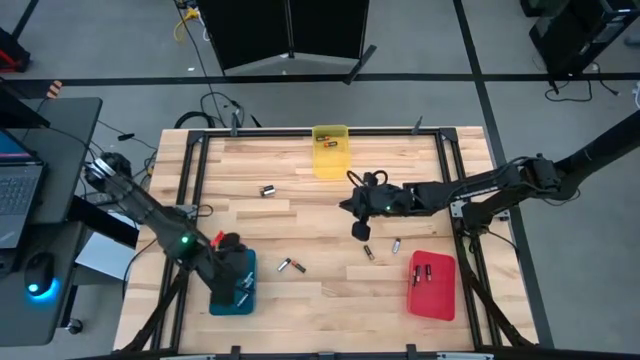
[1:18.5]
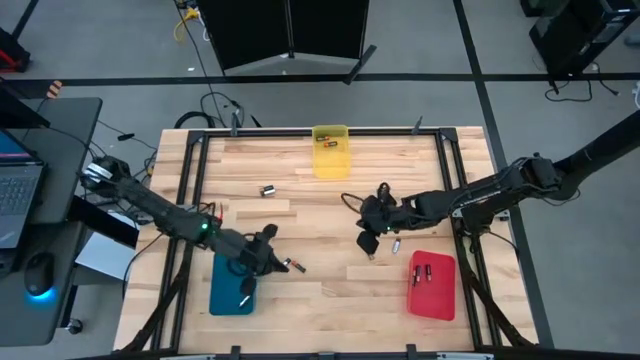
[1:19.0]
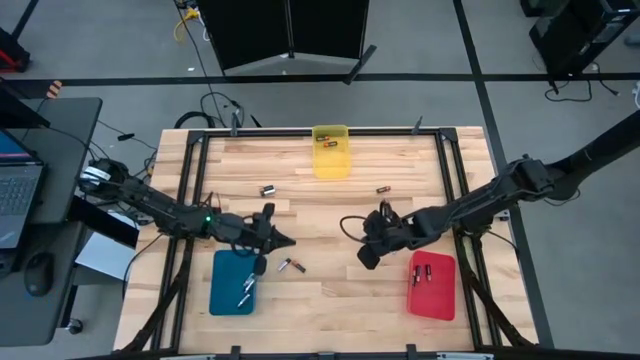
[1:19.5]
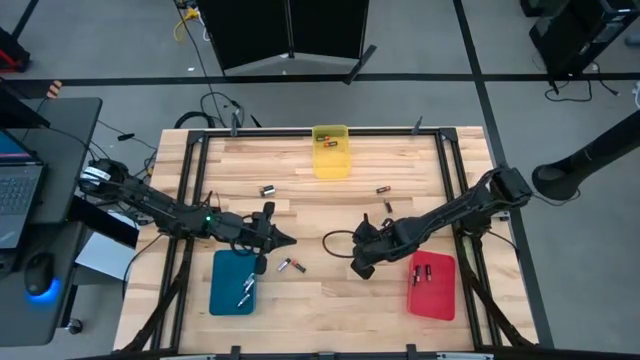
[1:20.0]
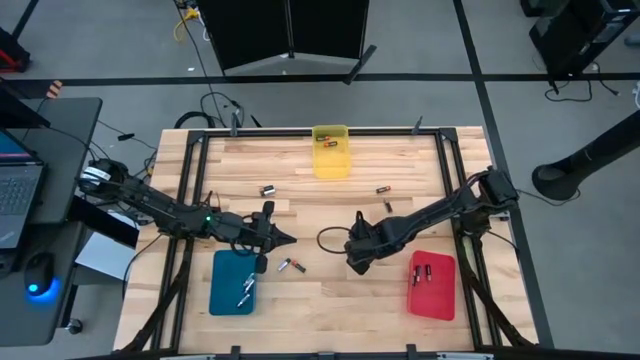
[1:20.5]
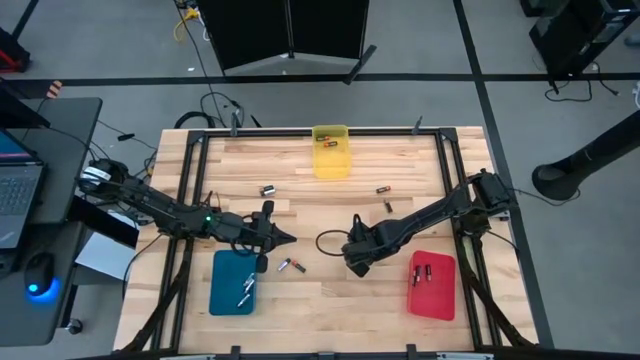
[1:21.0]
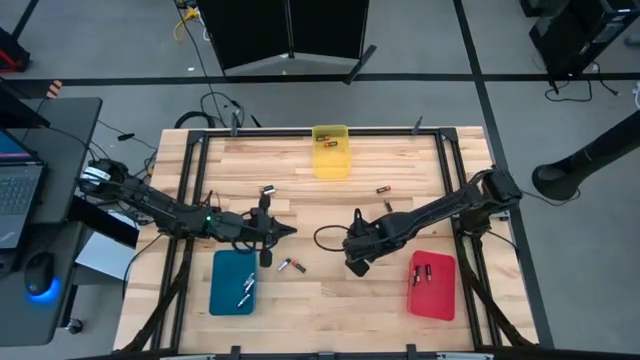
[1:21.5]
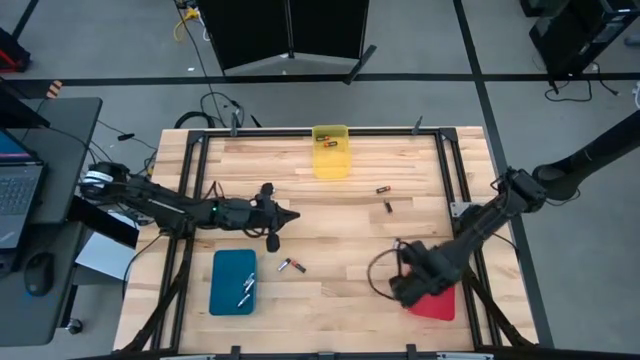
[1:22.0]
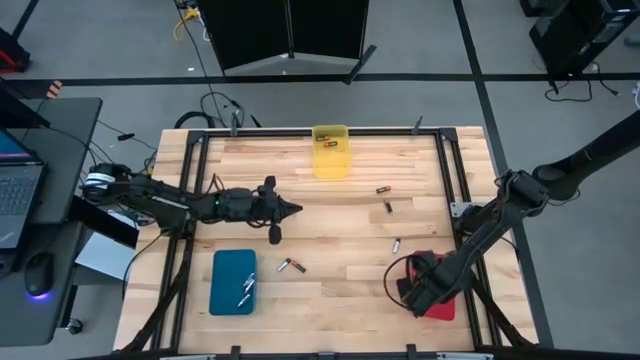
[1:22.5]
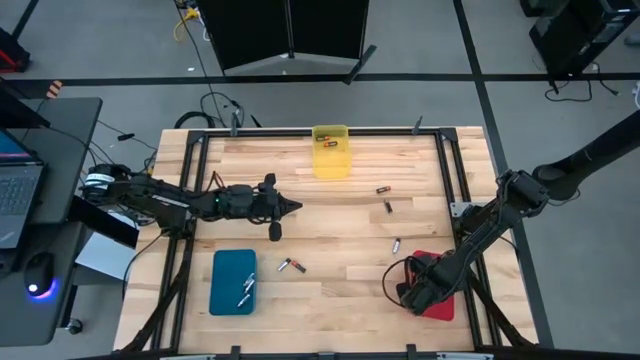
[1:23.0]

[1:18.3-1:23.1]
Task: Sort batteries
Put the bottom golden battery into the red bin

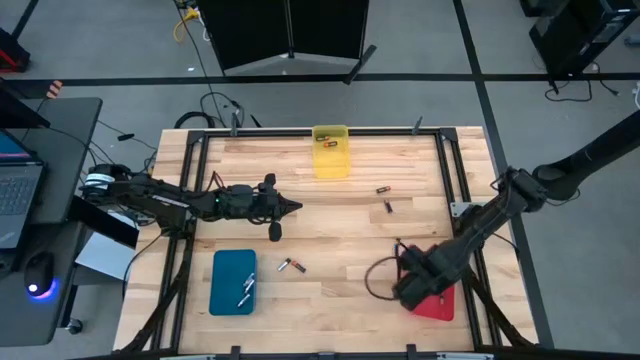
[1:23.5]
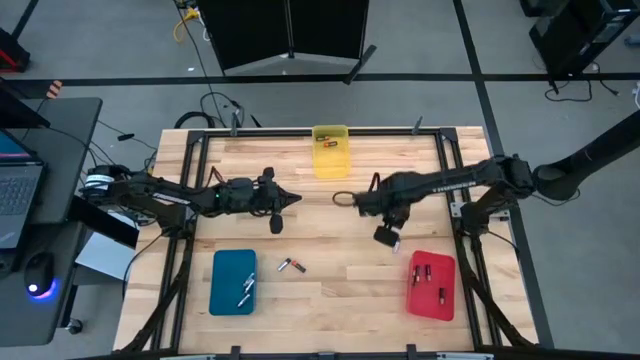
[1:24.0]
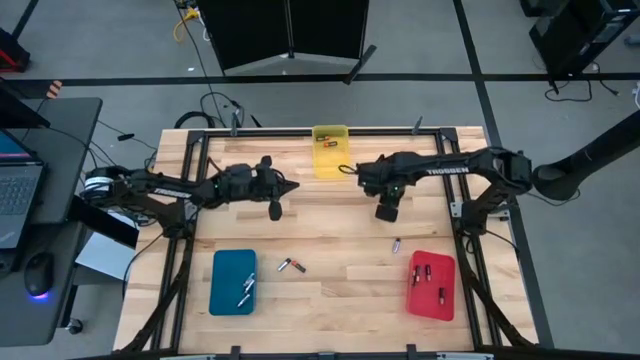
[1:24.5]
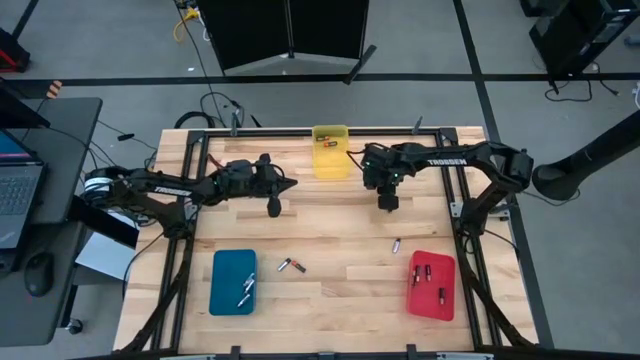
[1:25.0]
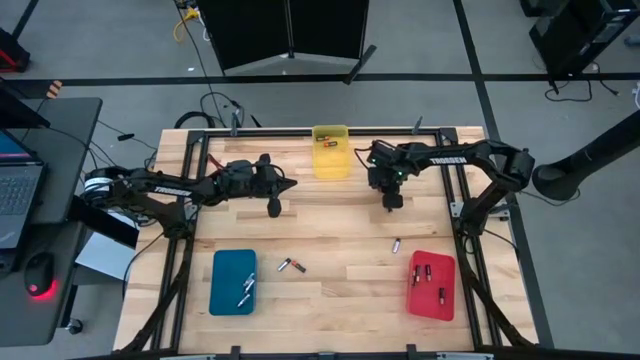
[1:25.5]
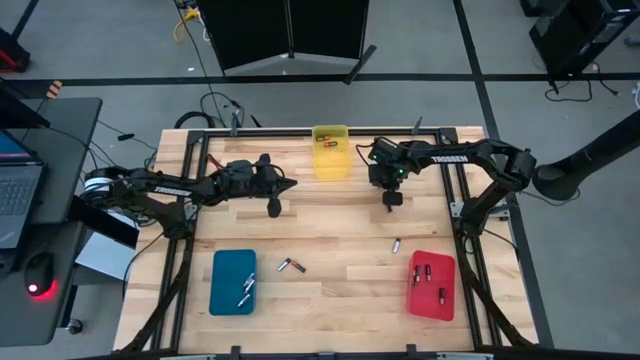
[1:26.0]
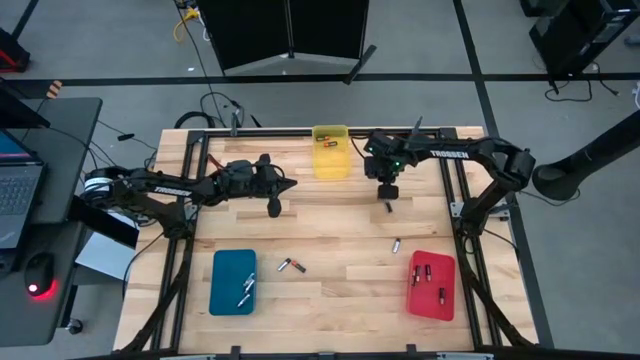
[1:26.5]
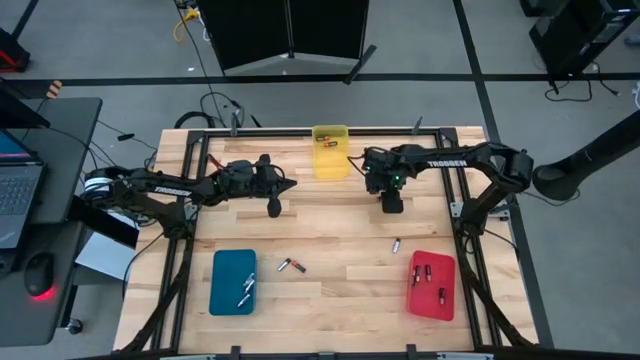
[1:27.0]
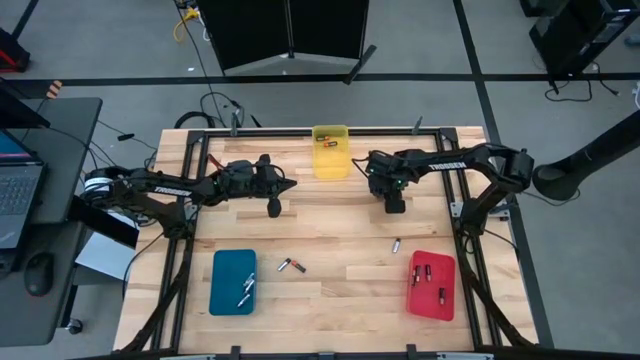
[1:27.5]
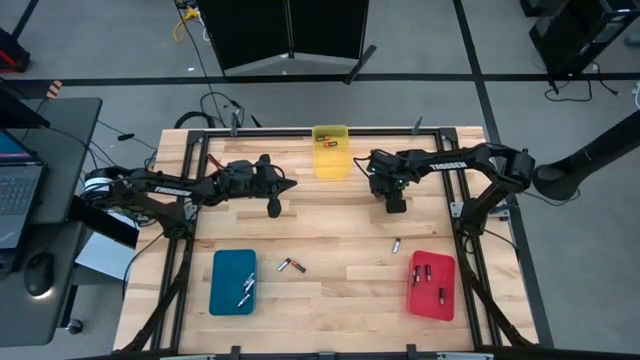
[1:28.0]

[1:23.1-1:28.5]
Put the top orange battery into the yellow bin

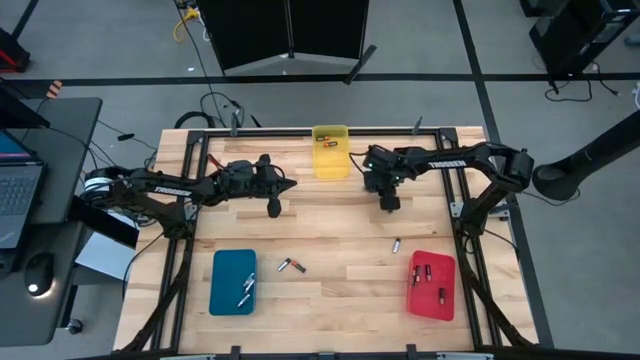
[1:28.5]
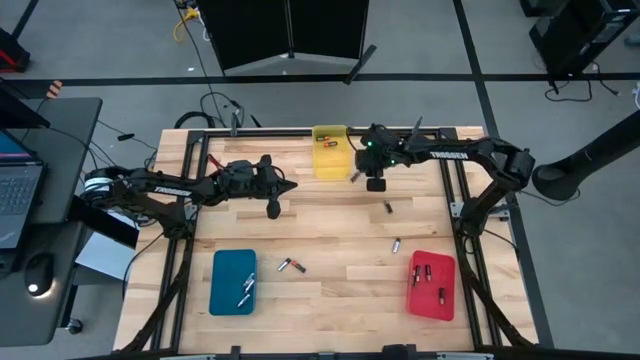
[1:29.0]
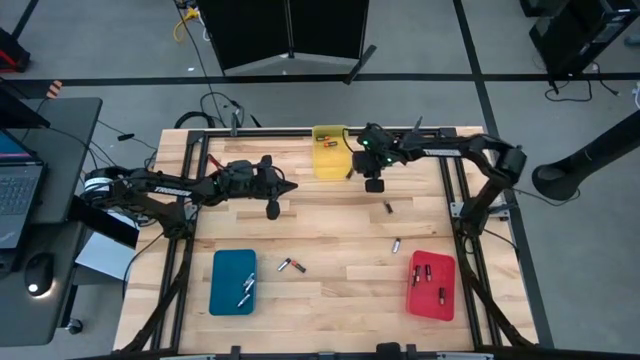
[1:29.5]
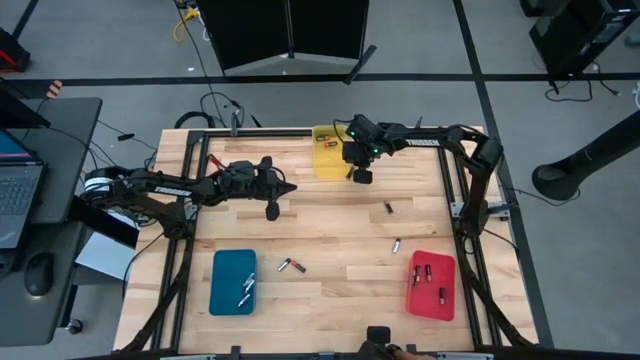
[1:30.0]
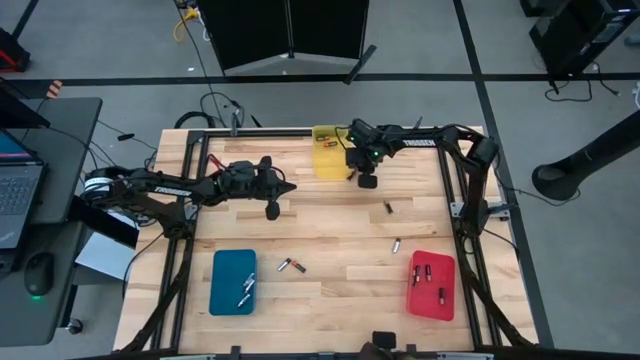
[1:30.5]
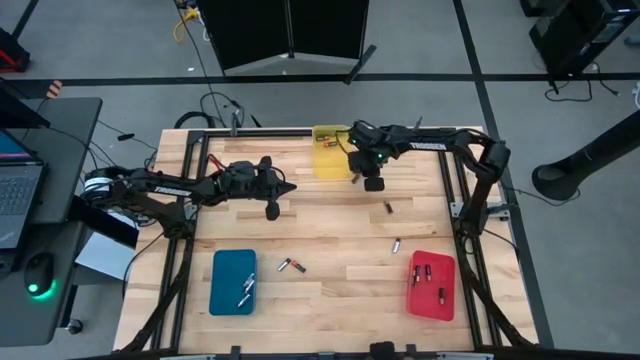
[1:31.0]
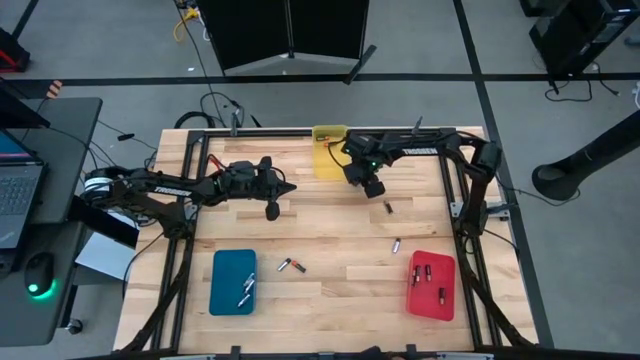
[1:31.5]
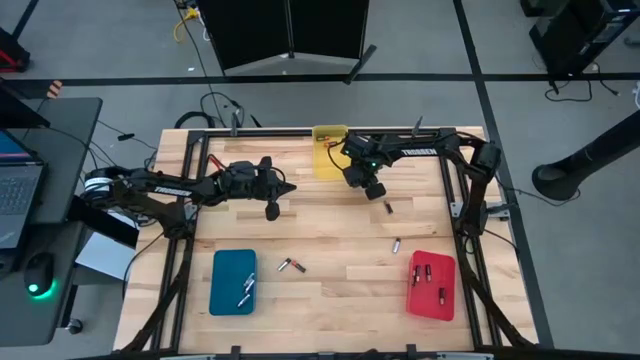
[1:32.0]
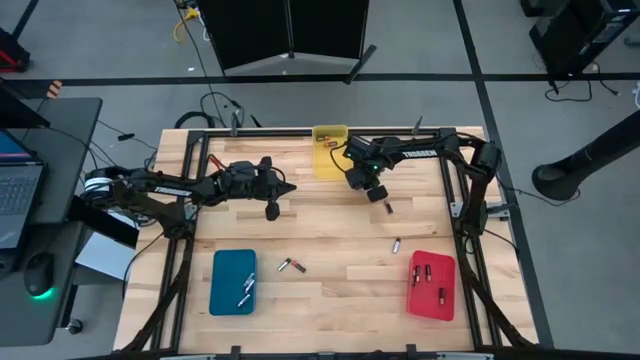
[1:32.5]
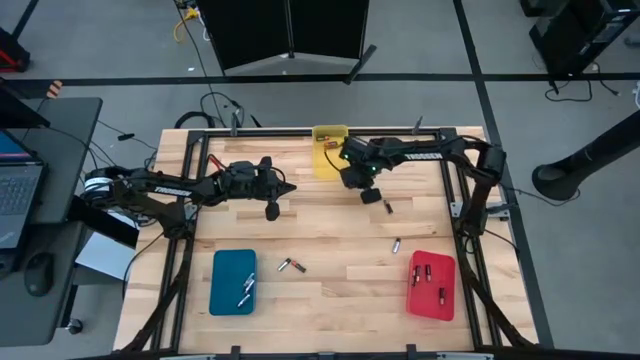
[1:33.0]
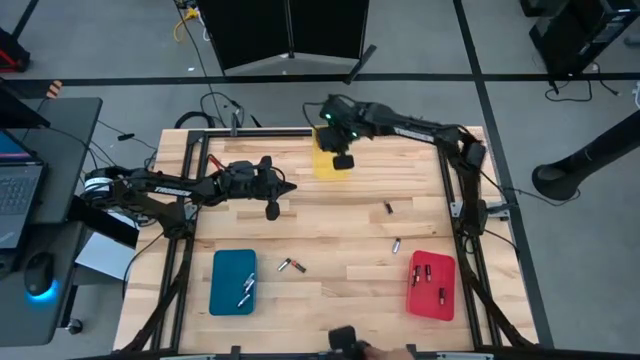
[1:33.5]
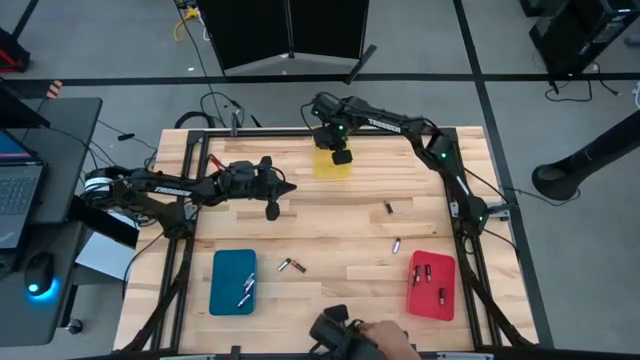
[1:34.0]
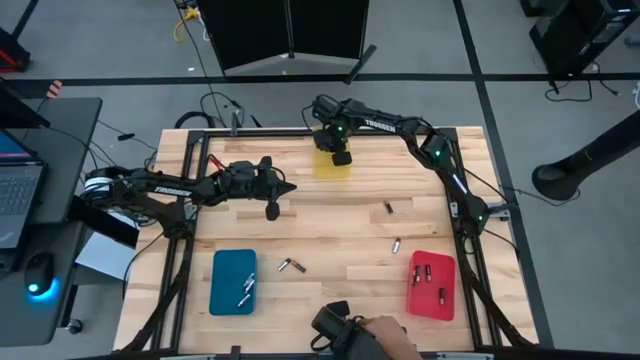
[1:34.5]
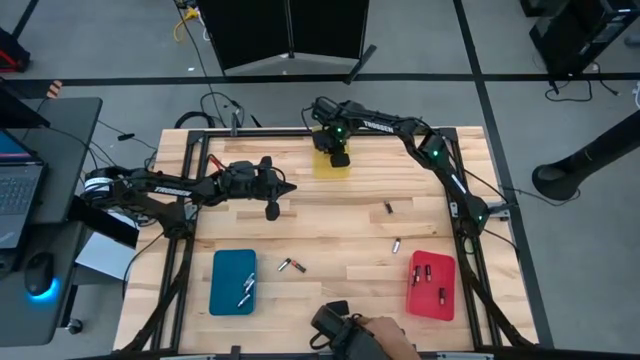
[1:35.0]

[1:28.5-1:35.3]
Put the top orange battery into the yellow bin

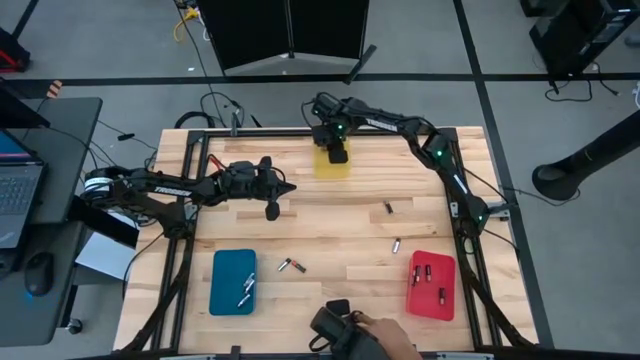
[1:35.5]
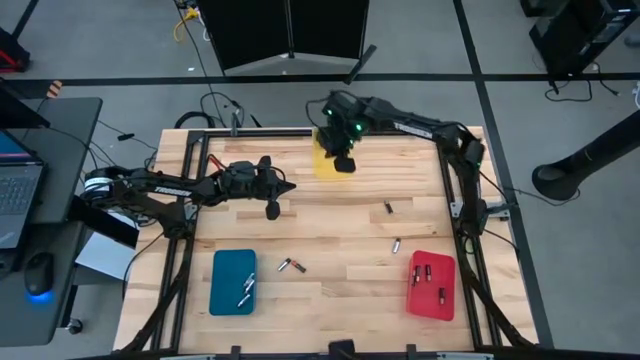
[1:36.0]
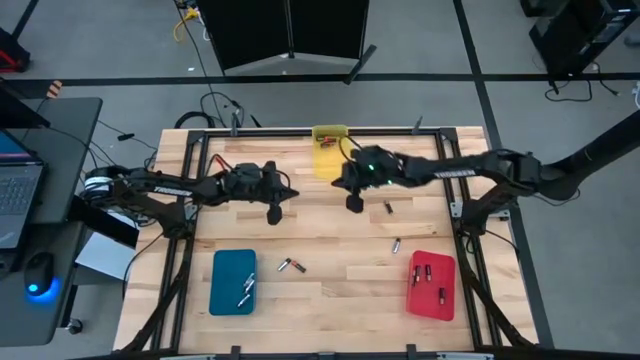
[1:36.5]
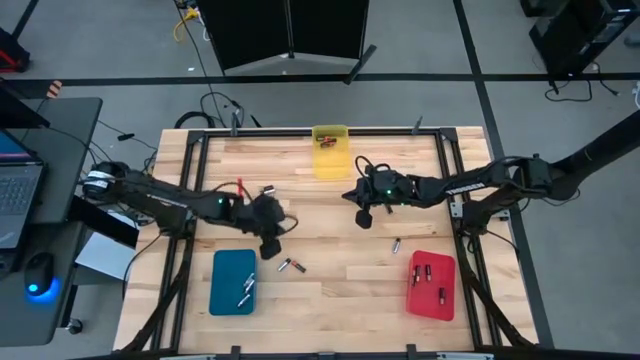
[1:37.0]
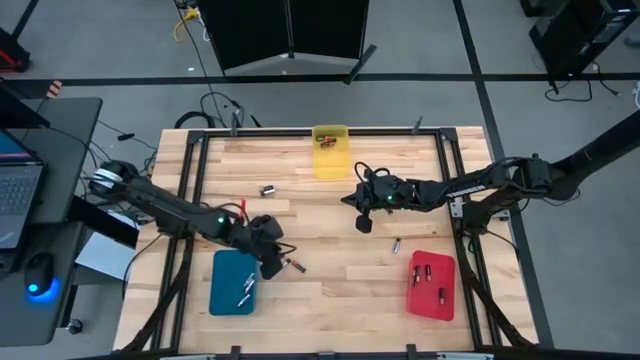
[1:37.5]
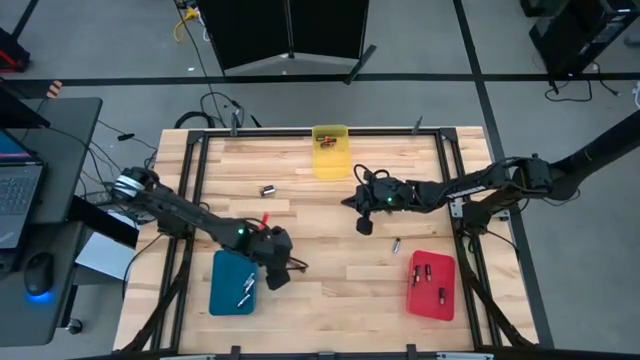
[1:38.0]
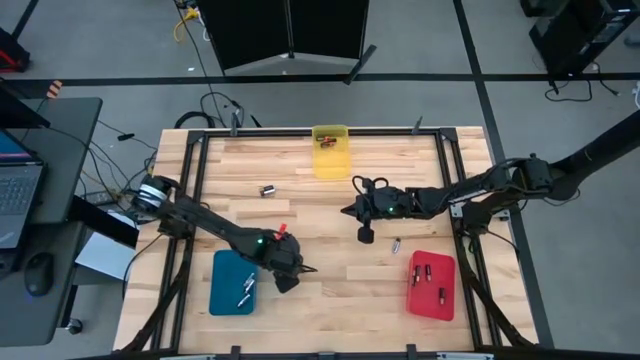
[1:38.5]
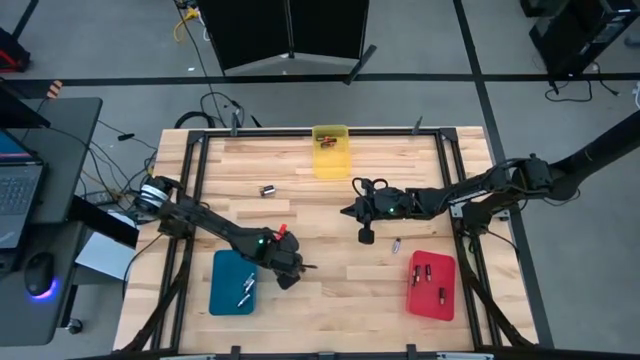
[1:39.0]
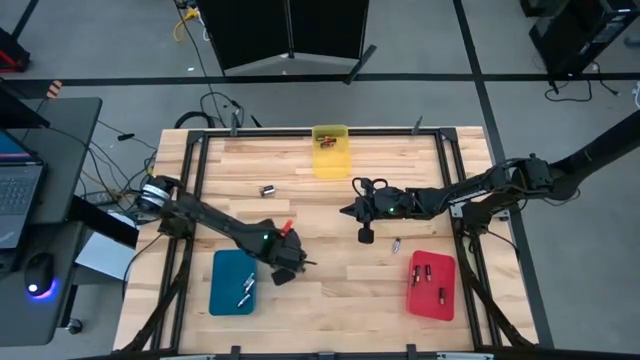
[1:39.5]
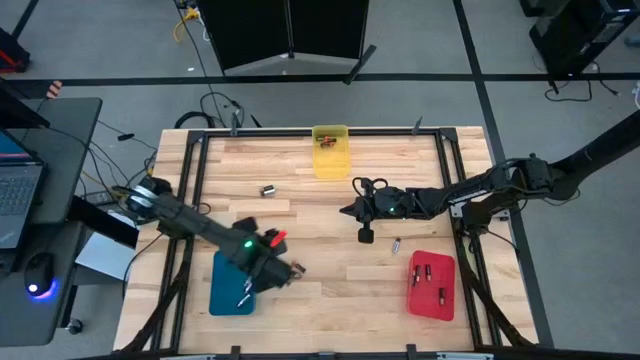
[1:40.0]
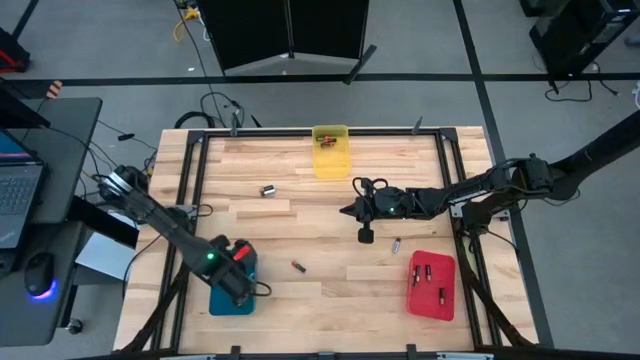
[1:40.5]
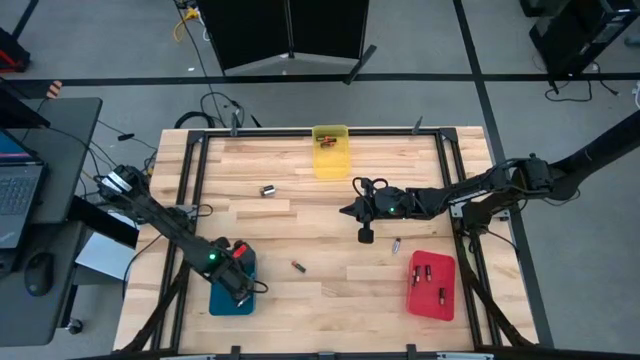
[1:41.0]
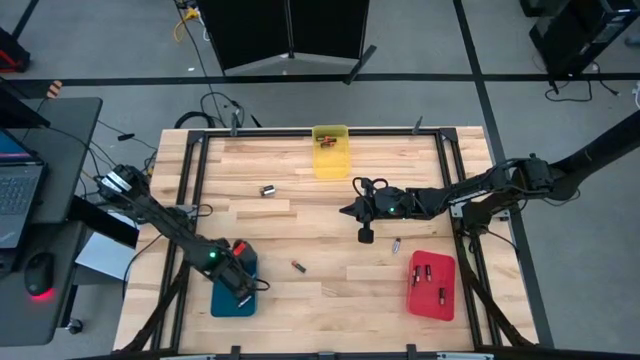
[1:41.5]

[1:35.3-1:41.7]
Put the bottom left silver battery into the blue bin
